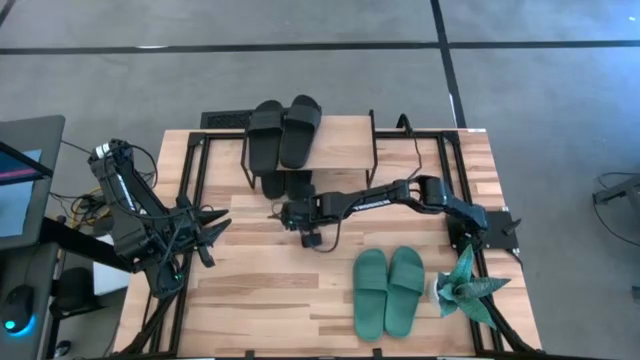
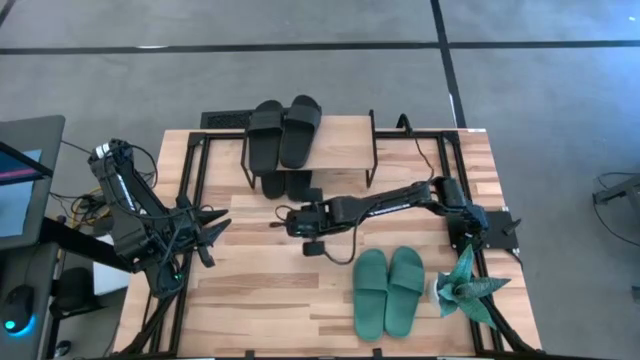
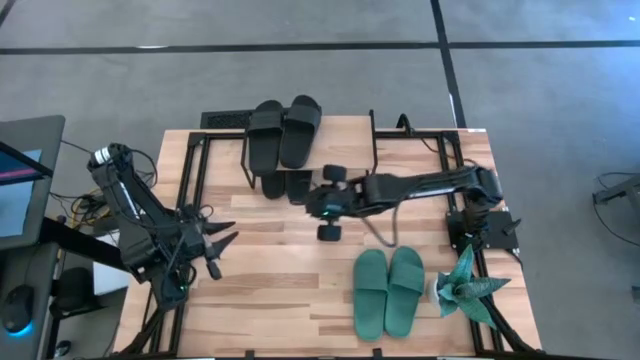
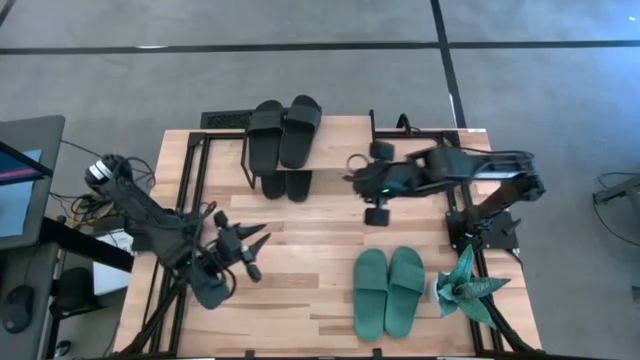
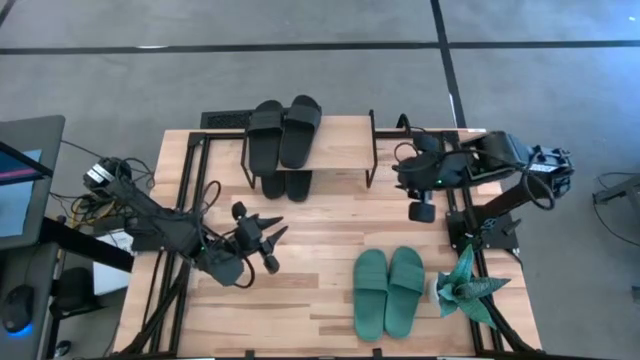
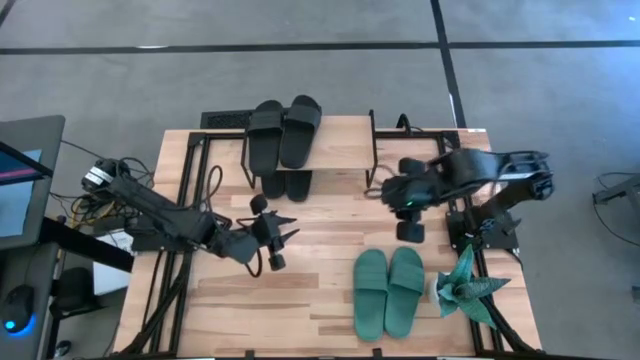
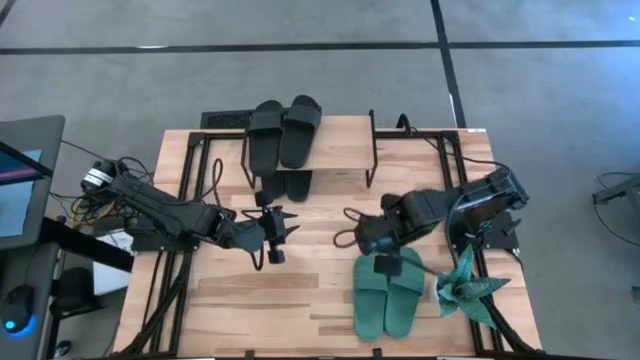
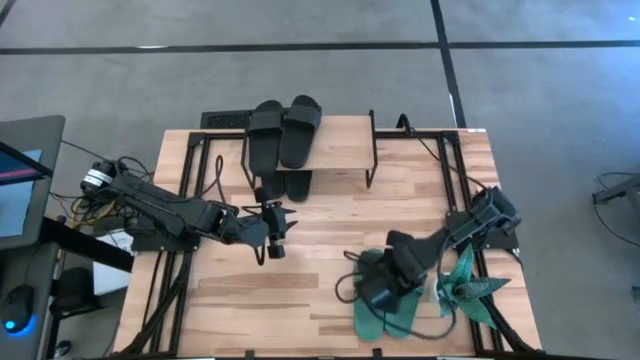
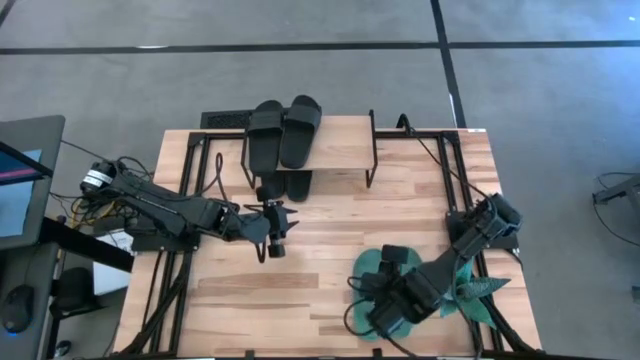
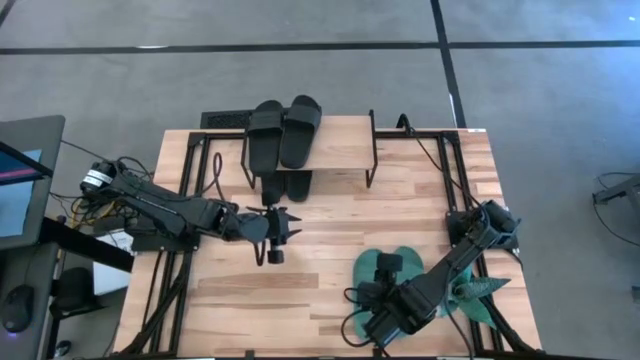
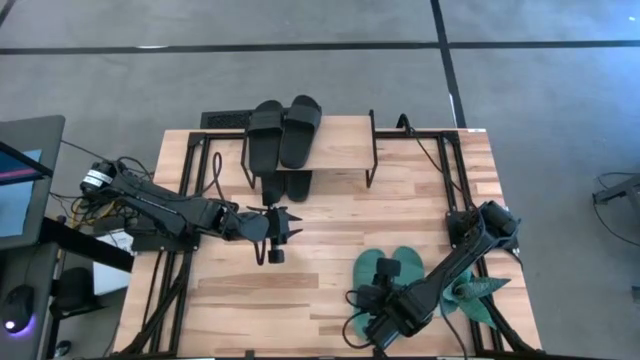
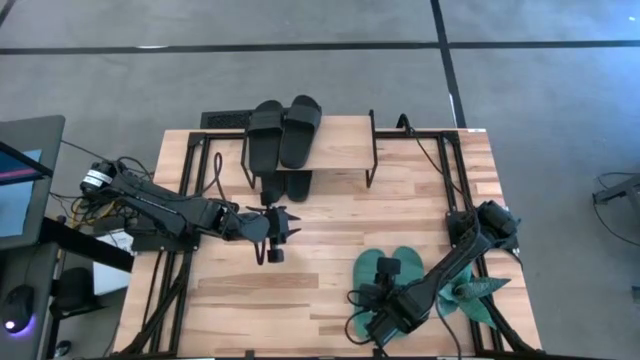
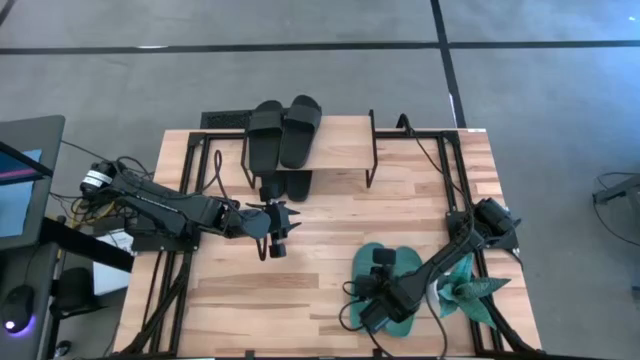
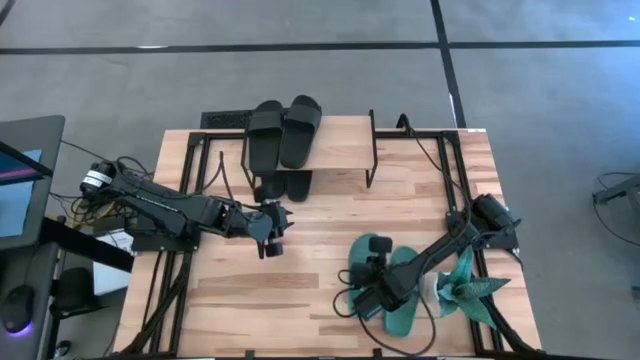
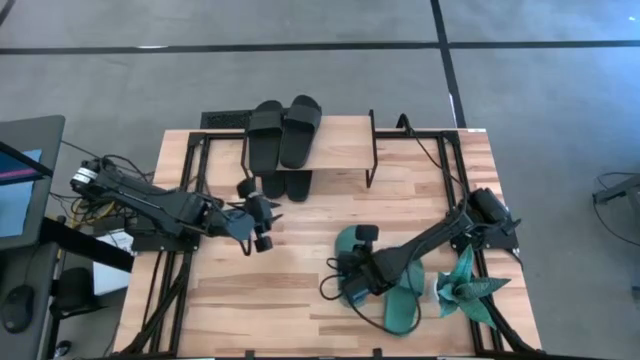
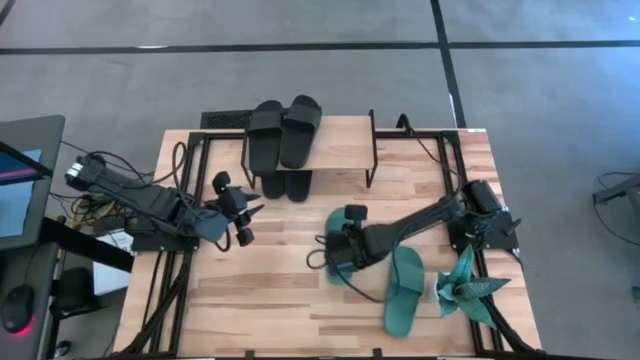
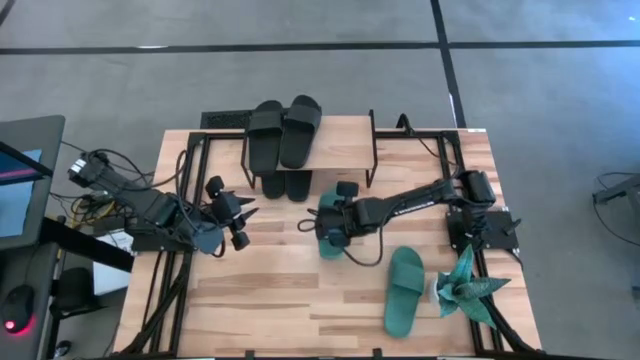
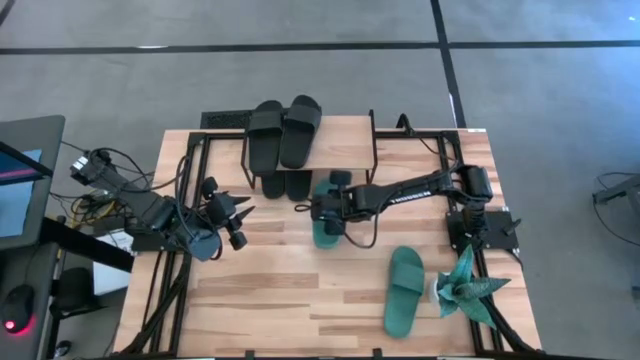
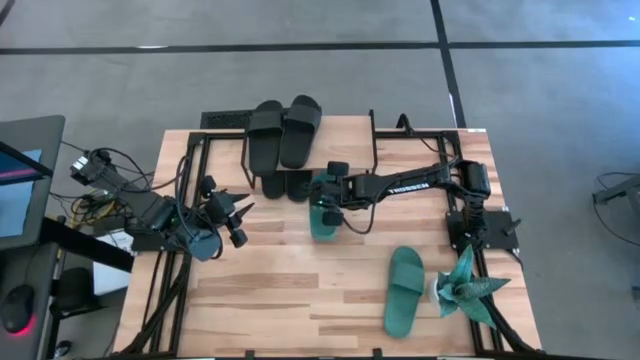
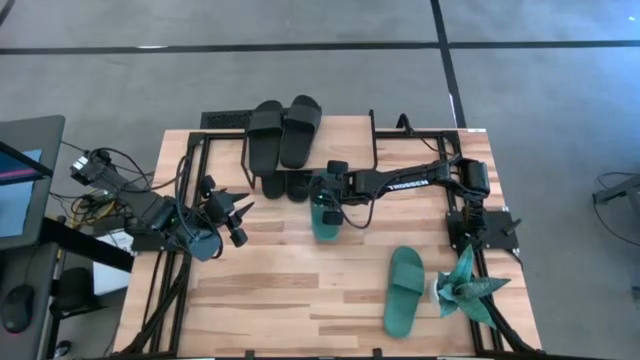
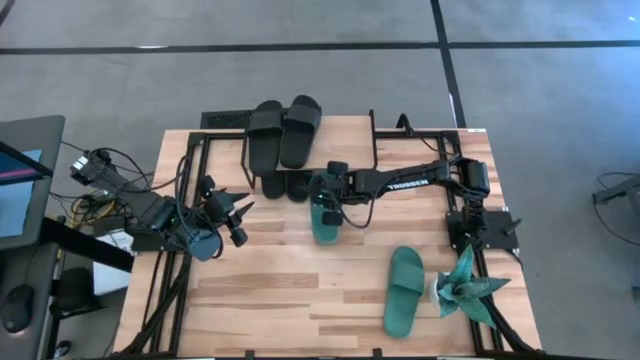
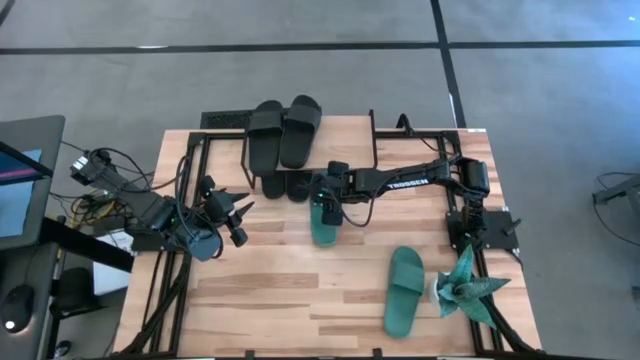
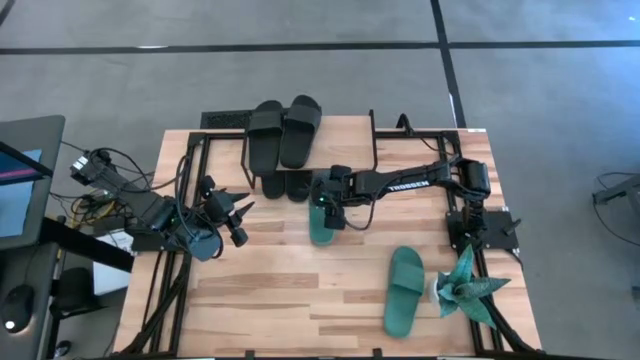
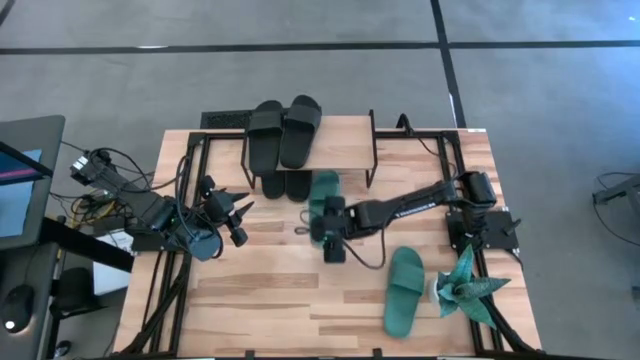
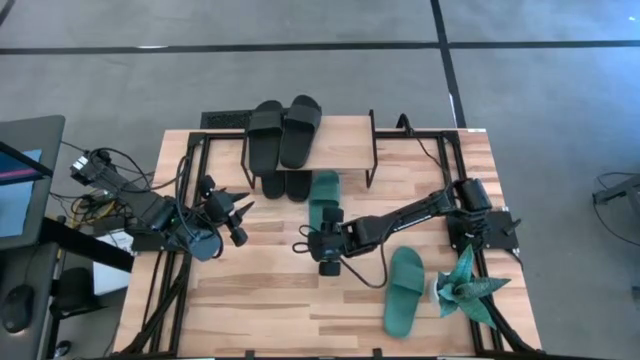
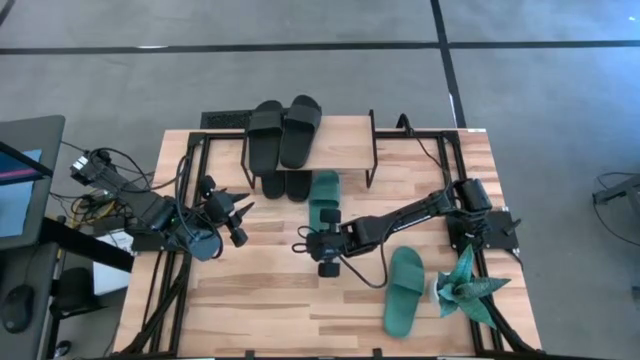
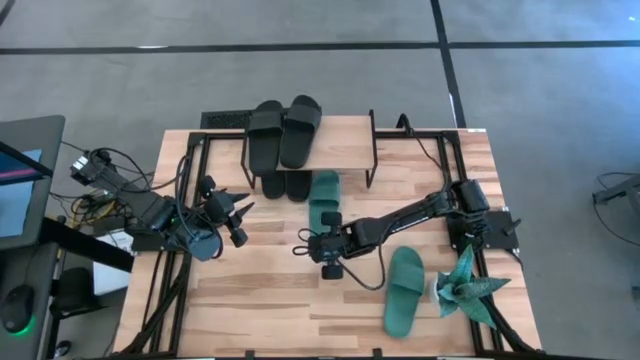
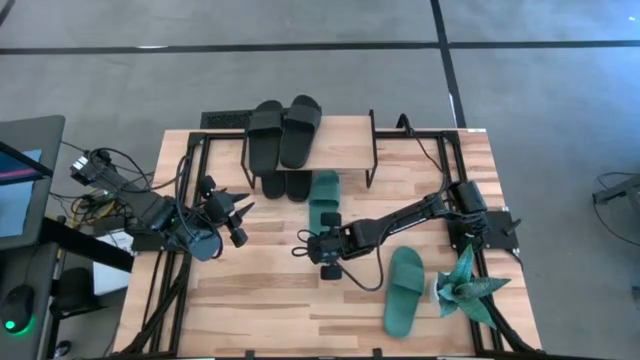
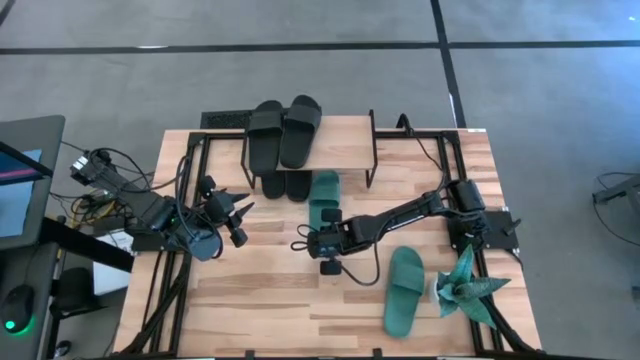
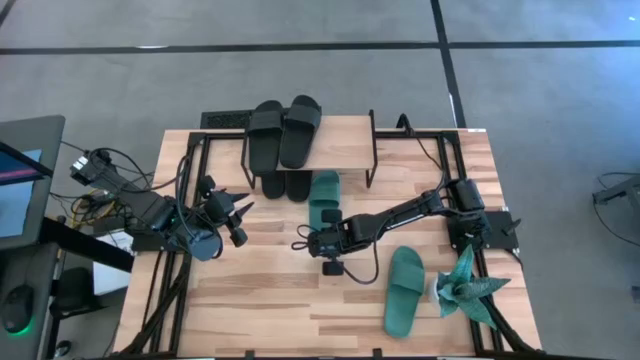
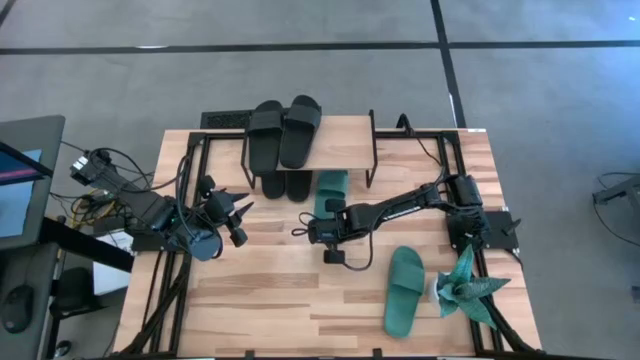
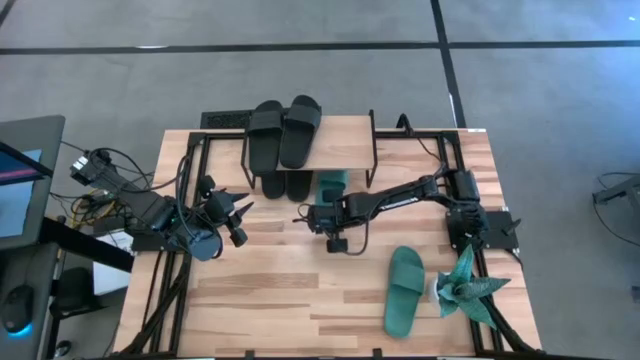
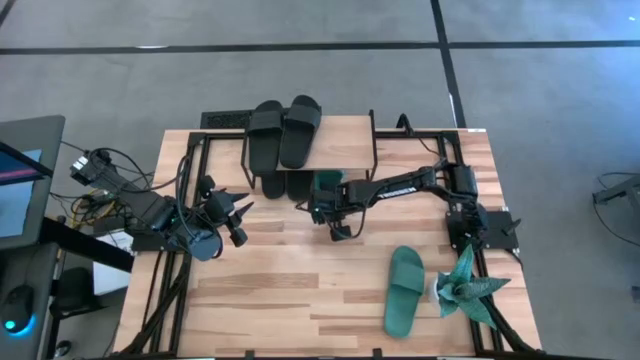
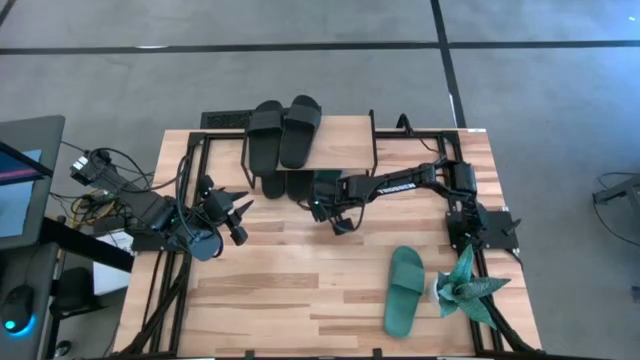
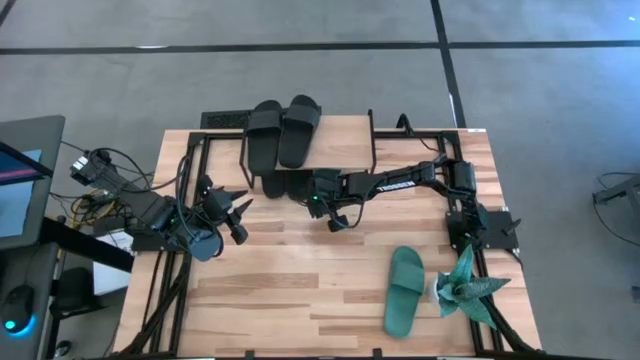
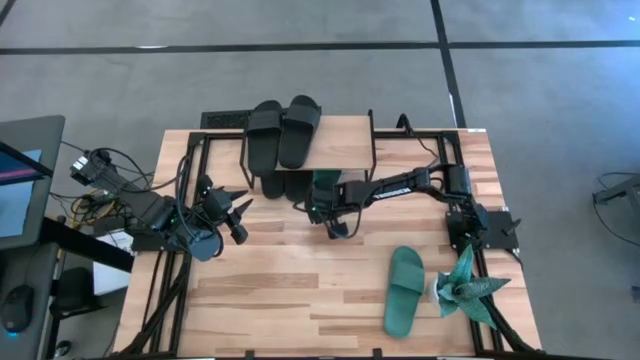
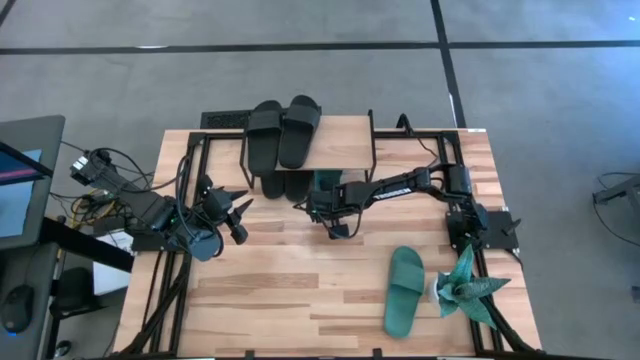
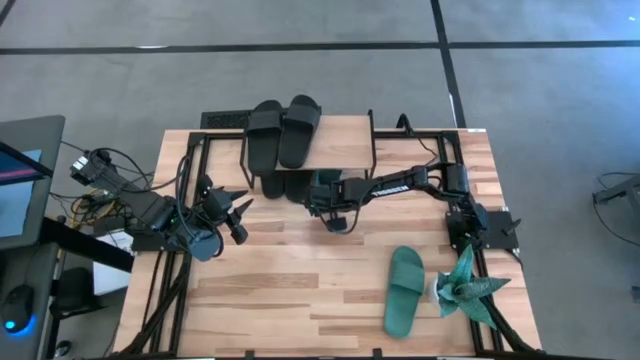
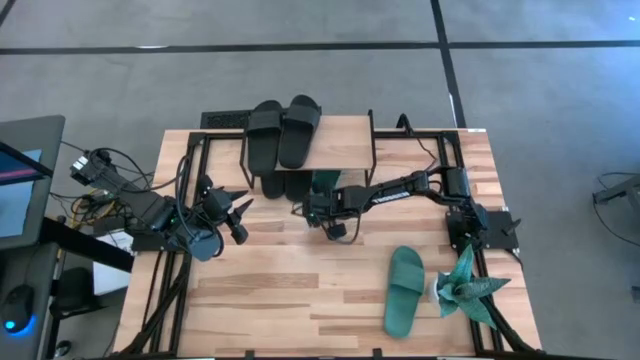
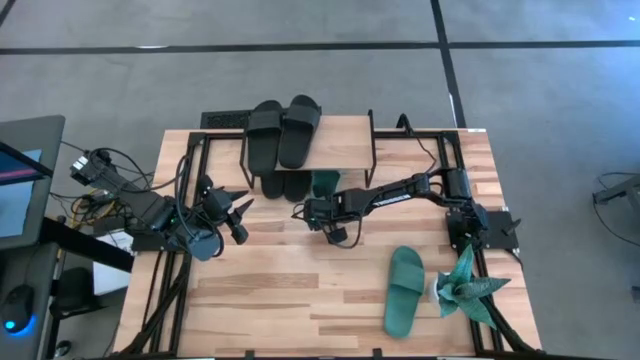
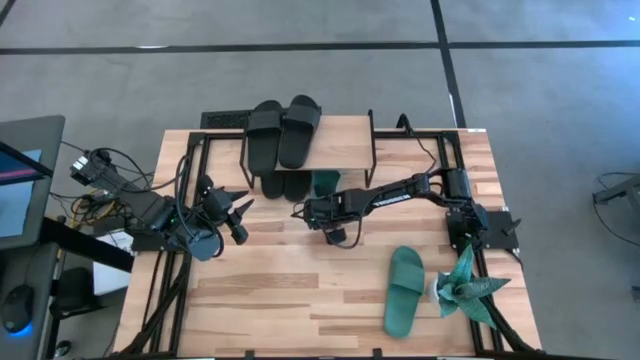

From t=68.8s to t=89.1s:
Task: Pick and place slides into the shelf
Put the green slipper under the shelf
